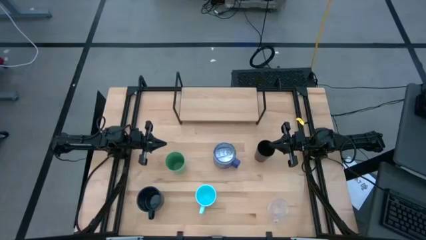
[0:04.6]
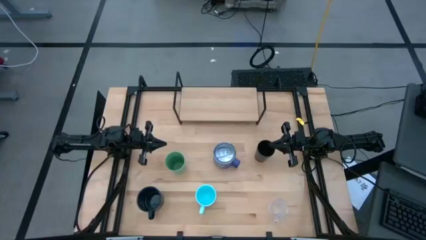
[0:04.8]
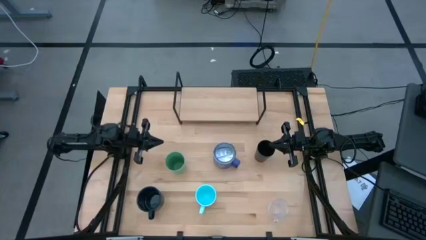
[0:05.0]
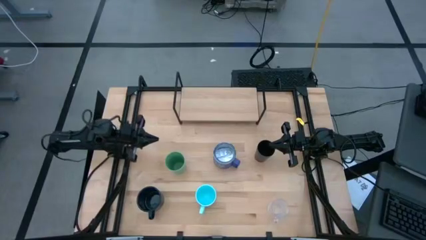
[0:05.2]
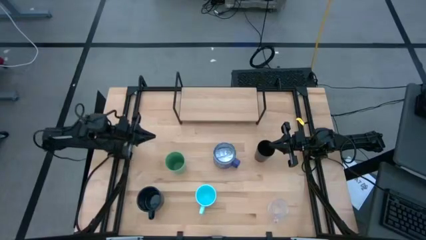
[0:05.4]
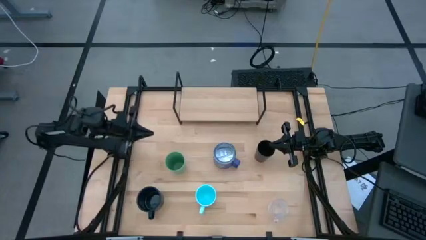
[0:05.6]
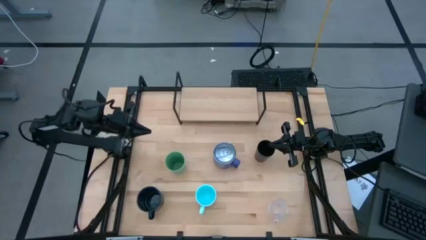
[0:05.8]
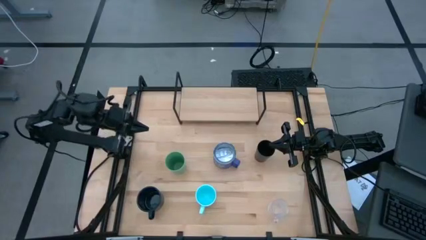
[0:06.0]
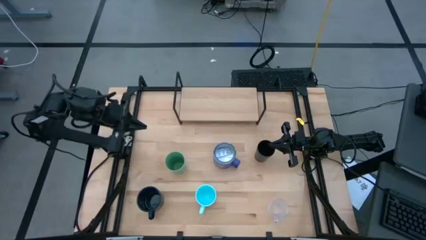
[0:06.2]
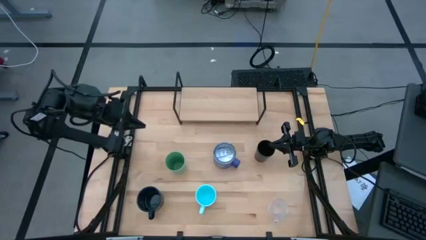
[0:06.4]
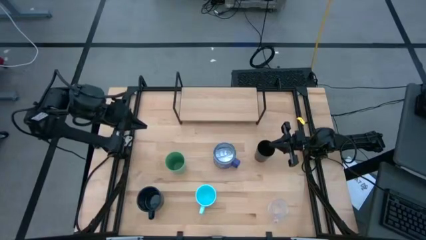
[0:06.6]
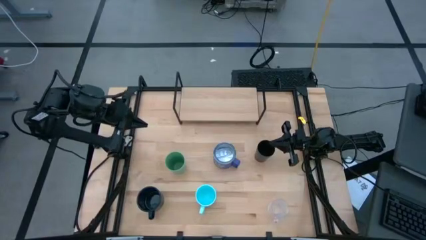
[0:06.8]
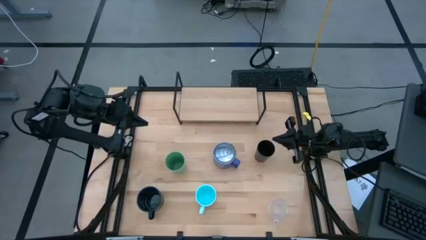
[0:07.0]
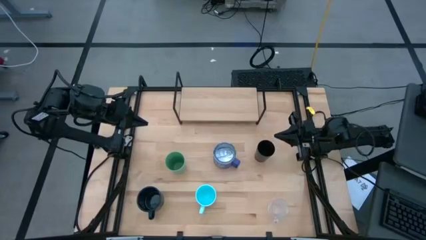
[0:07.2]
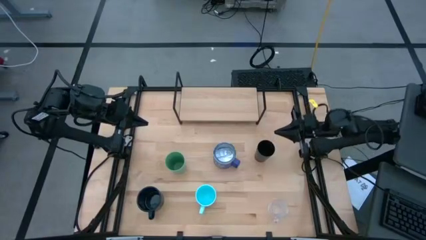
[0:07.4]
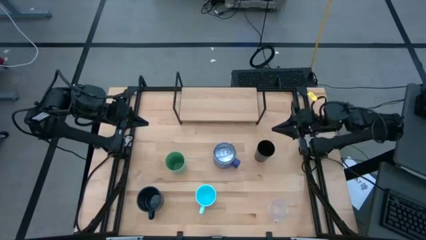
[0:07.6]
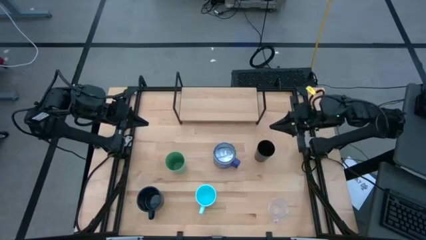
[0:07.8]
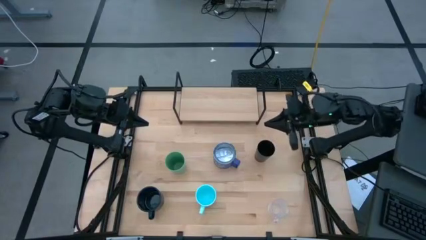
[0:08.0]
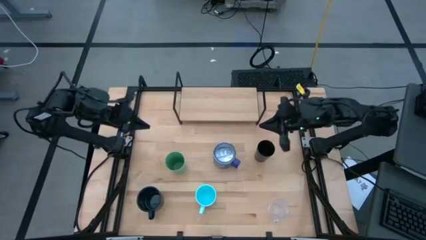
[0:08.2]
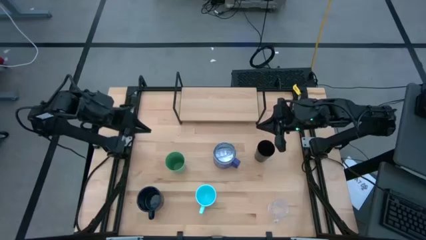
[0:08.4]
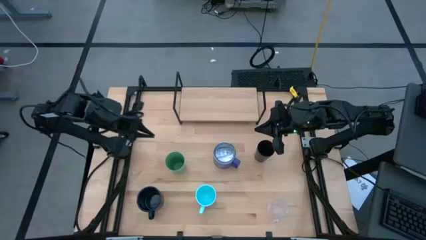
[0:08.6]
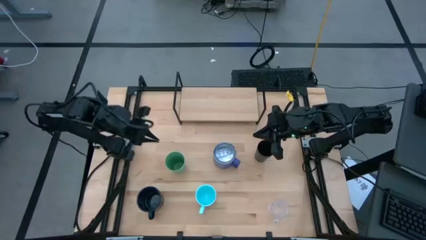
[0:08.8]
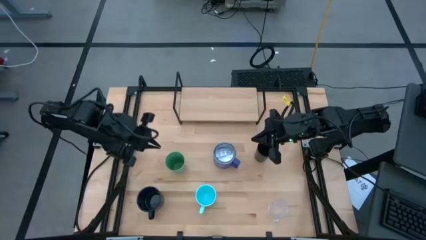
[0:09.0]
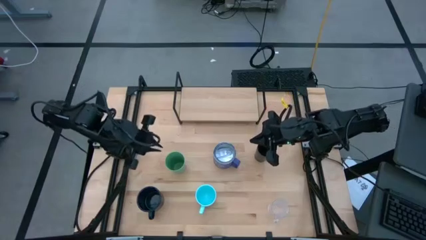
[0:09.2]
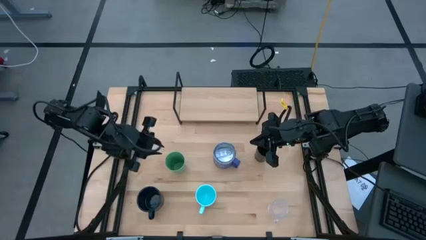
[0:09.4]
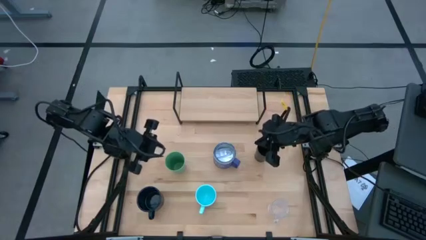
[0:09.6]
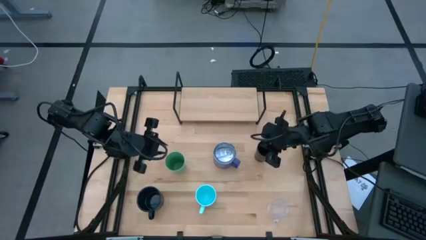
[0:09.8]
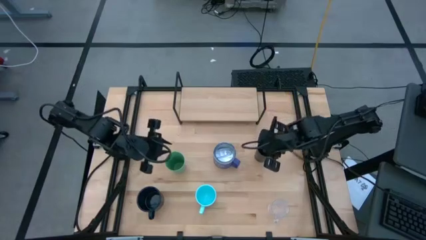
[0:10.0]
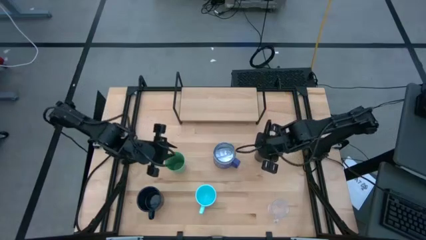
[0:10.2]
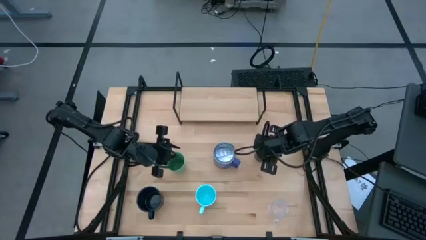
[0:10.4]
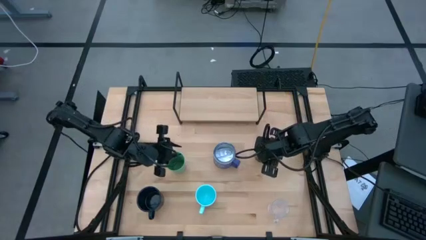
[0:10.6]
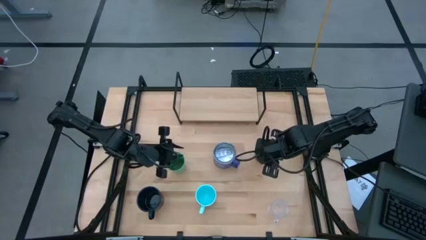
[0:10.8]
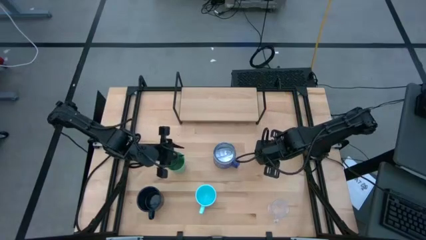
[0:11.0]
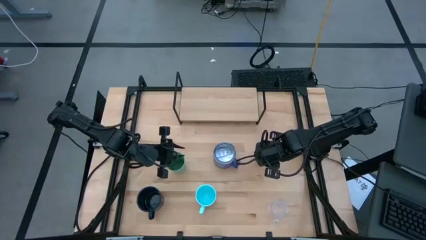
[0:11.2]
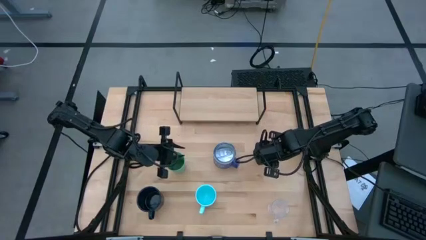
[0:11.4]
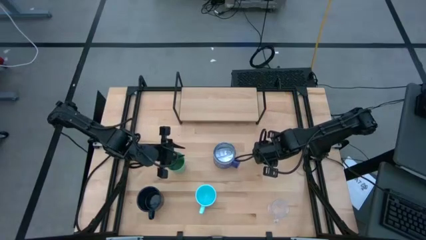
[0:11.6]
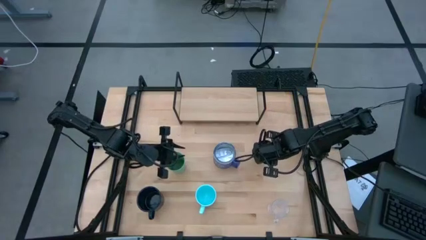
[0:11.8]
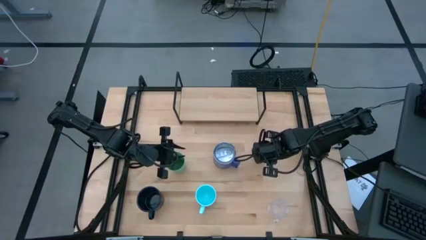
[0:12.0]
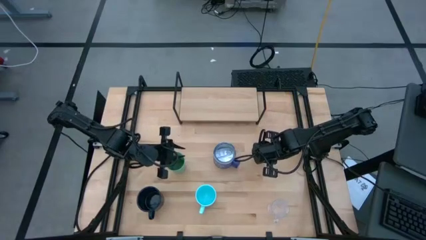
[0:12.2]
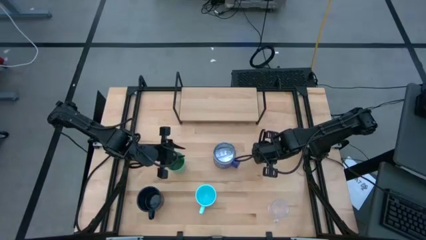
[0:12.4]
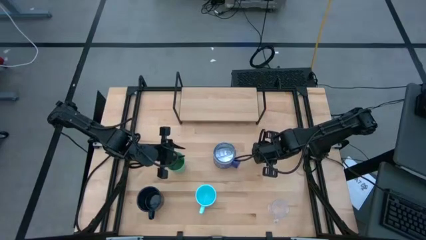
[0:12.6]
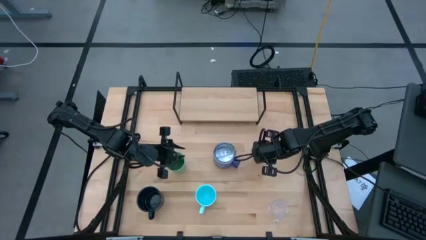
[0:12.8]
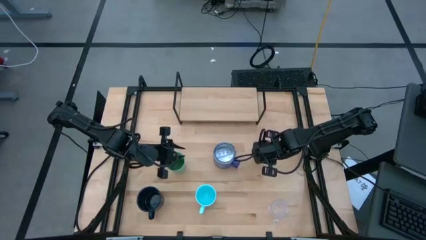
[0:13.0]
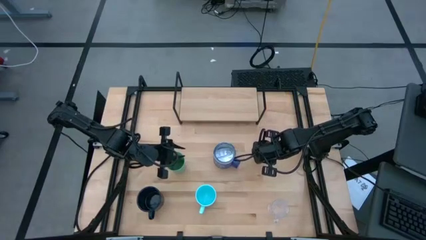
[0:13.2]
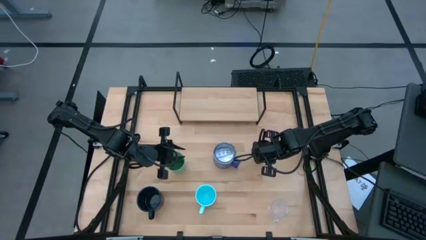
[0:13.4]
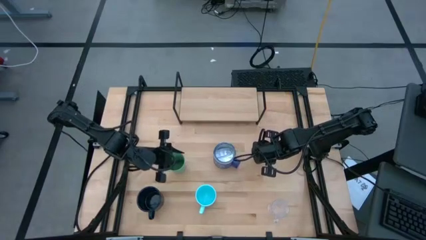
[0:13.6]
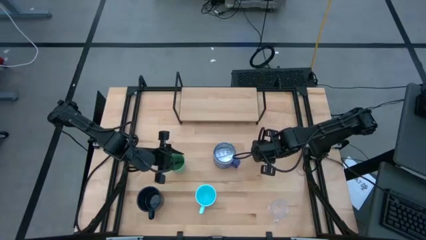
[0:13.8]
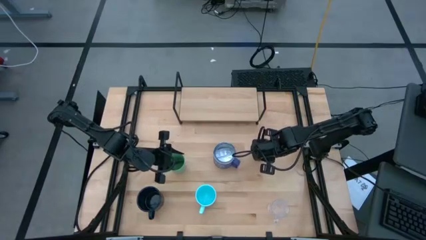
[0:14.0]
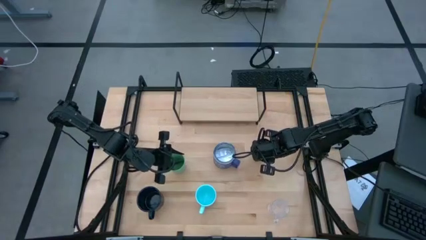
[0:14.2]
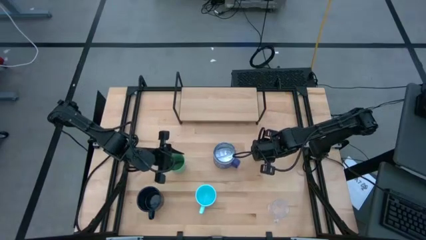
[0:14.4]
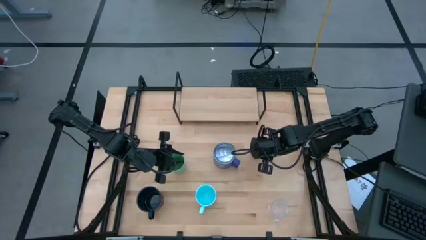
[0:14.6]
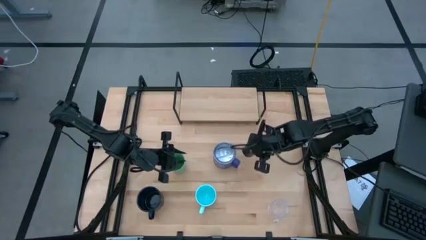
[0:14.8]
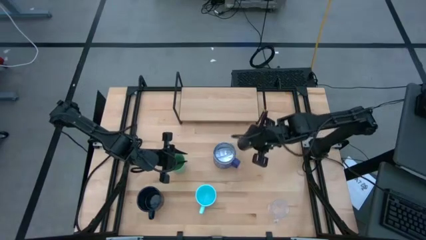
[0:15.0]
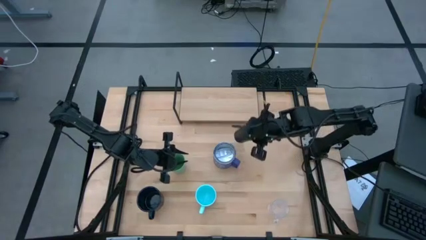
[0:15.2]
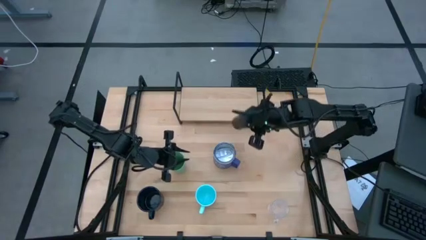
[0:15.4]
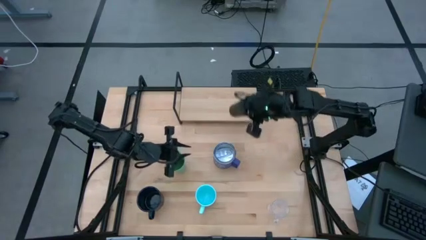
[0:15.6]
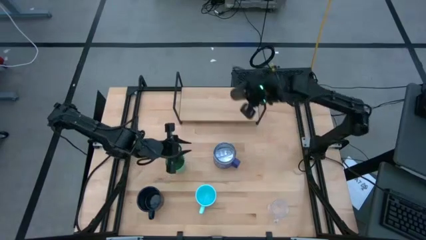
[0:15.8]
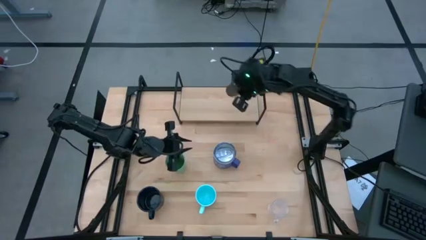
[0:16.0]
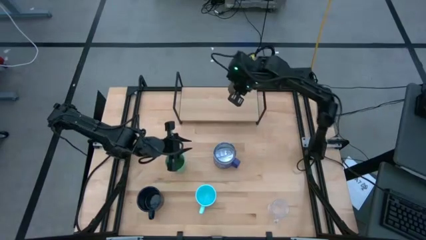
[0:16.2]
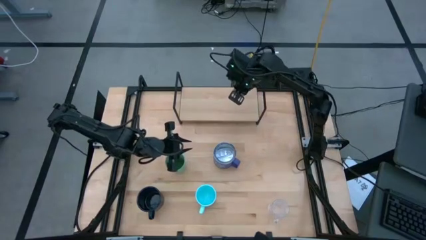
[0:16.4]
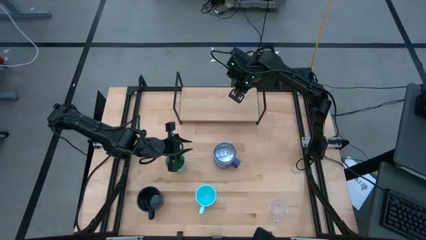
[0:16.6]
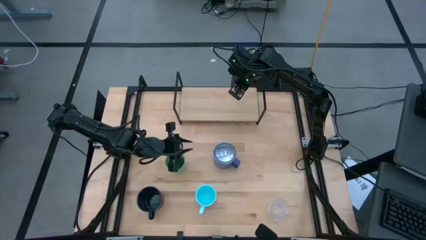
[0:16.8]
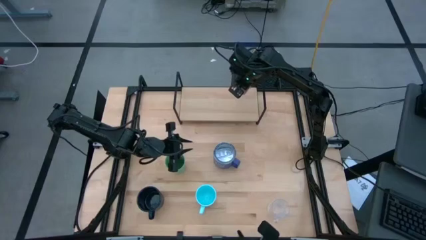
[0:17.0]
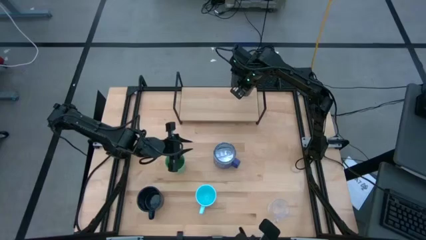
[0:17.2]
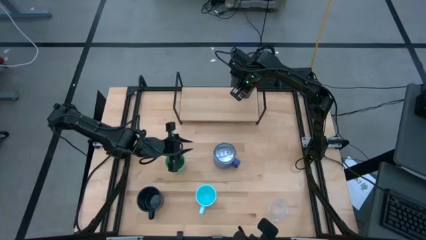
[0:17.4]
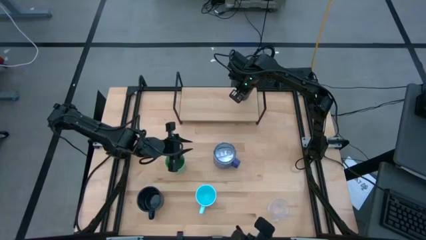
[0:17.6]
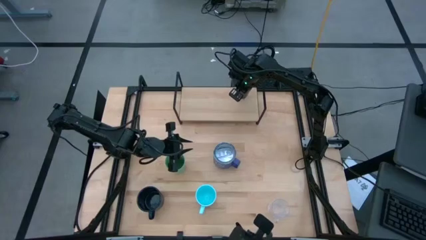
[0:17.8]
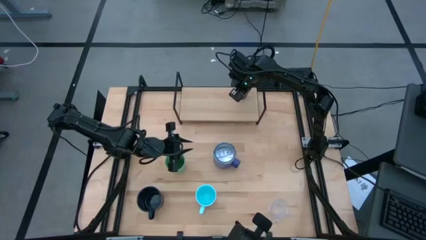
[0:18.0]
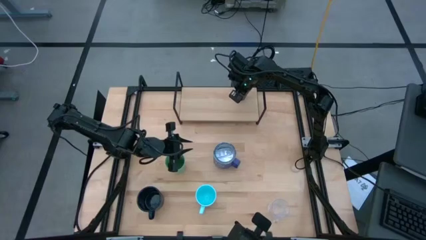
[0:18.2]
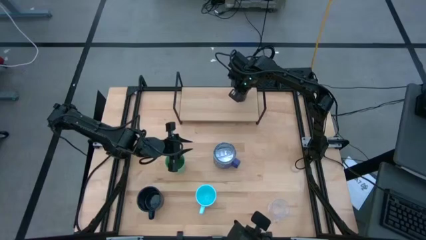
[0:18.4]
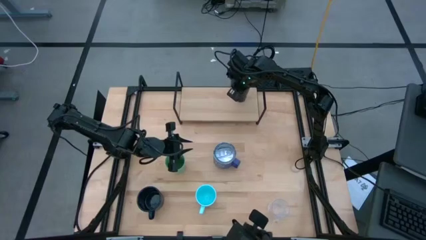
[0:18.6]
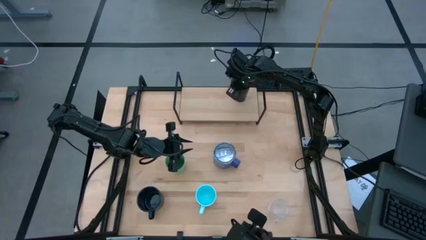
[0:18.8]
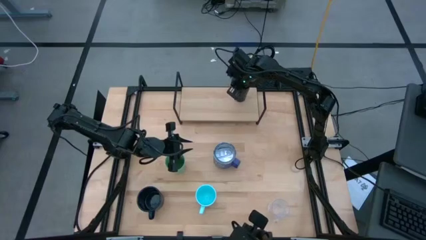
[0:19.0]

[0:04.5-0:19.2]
Task: Stack small to large cups/mugs on shelf
Put the black cup on the shelf

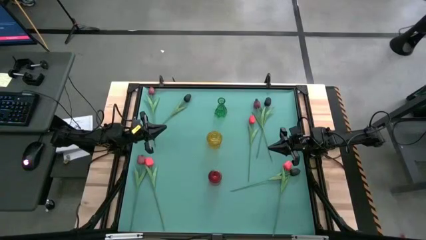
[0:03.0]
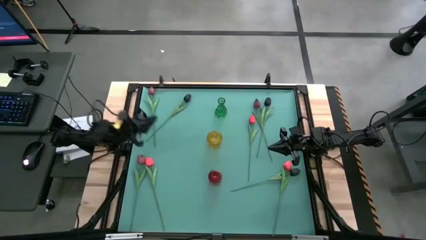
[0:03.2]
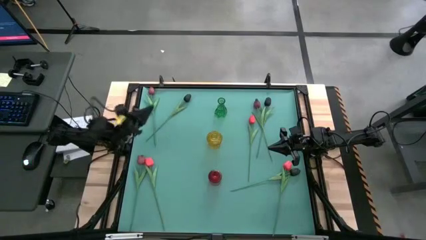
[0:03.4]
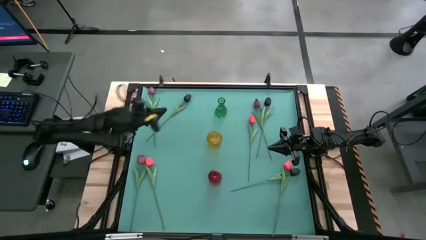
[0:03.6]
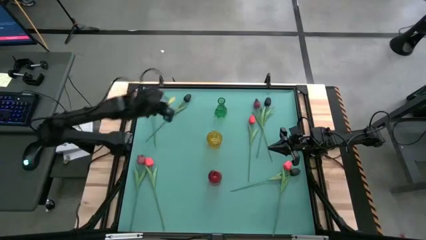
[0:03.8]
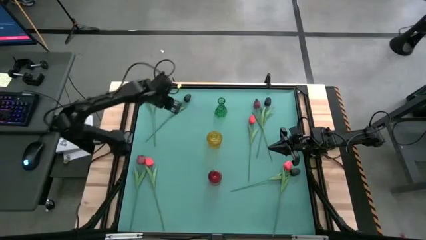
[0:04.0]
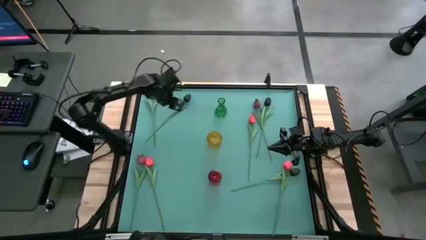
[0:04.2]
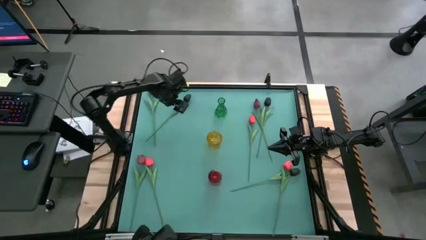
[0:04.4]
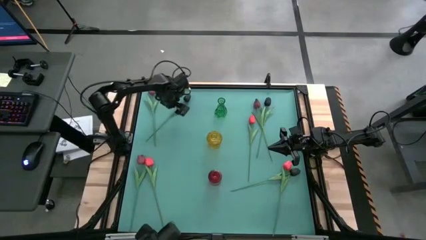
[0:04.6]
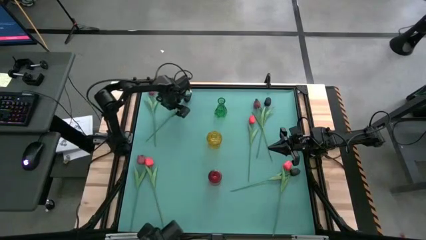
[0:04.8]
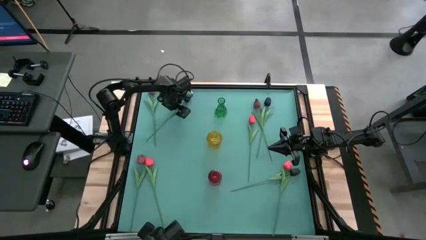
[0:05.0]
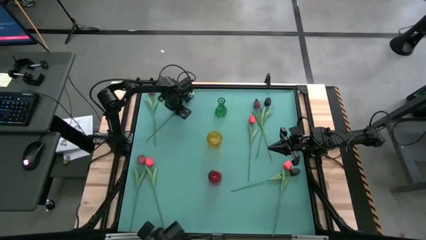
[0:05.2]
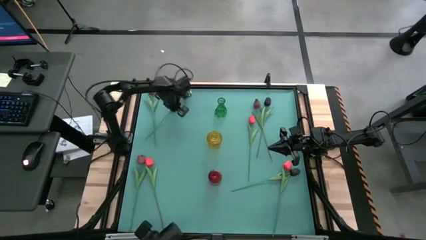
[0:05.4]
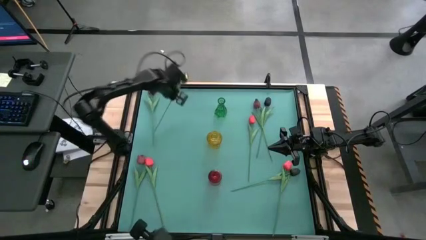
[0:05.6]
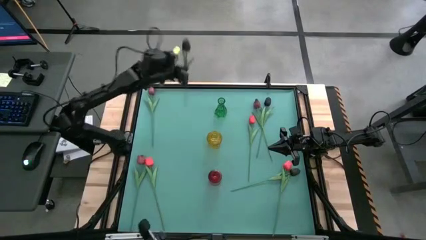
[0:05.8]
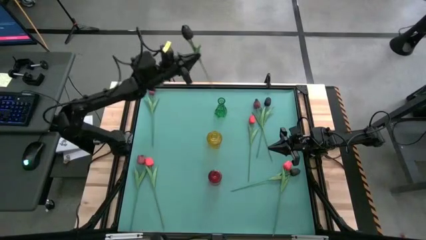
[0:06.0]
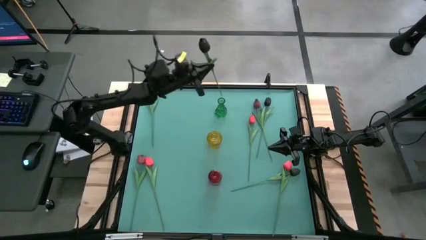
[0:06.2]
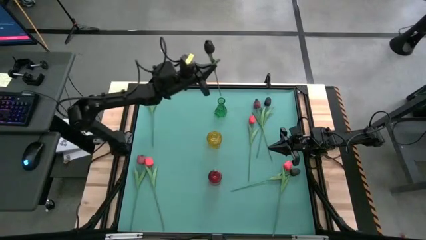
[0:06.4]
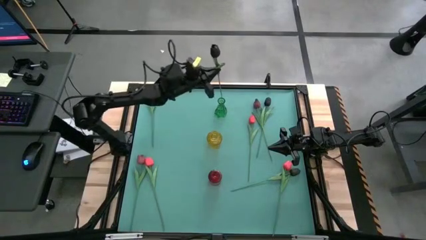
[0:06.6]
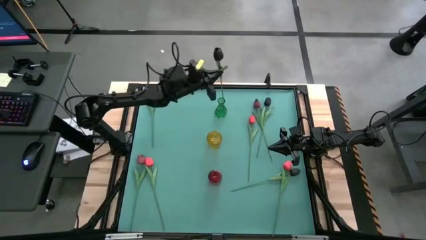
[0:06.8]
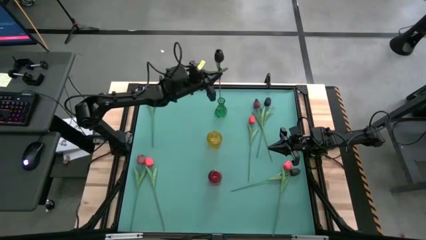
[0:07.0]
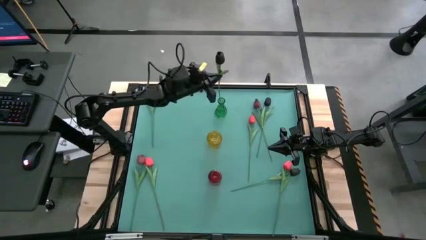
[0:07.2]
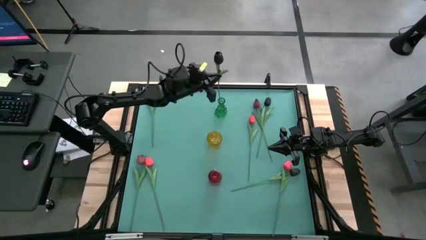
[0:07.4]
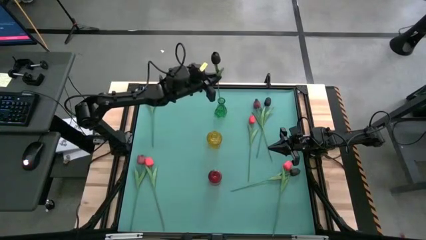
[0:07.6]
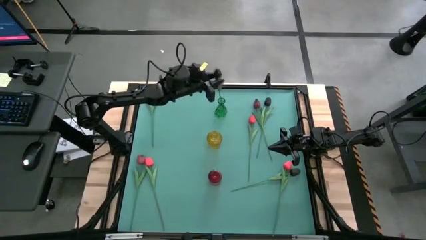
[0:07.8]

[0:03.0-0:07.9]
Task: Sort flowers into vase by color
Put the top left black tulip into the green vase
